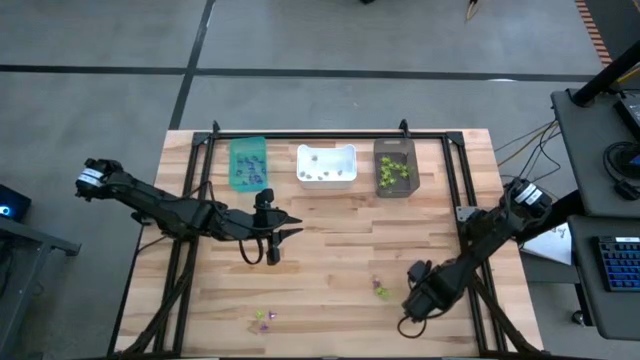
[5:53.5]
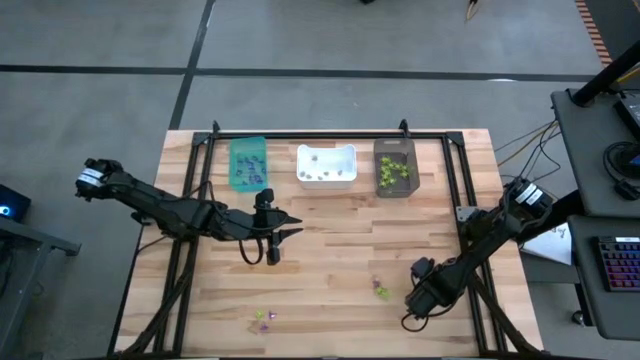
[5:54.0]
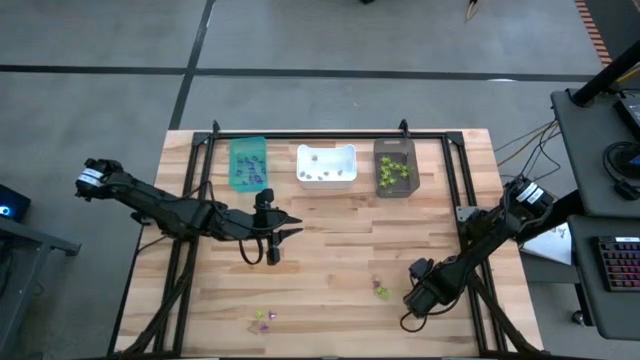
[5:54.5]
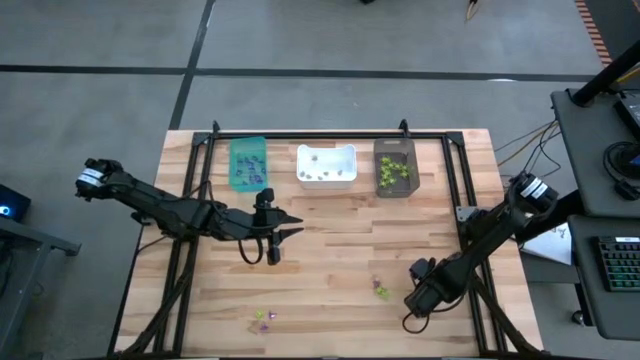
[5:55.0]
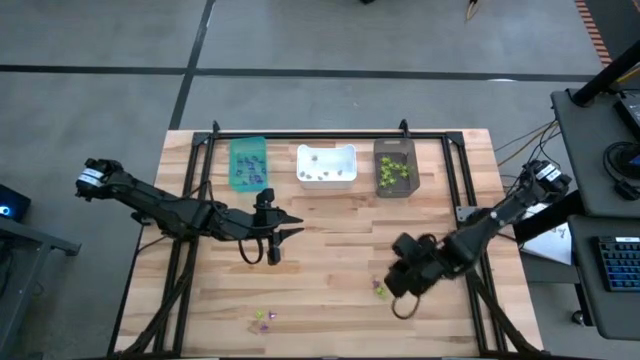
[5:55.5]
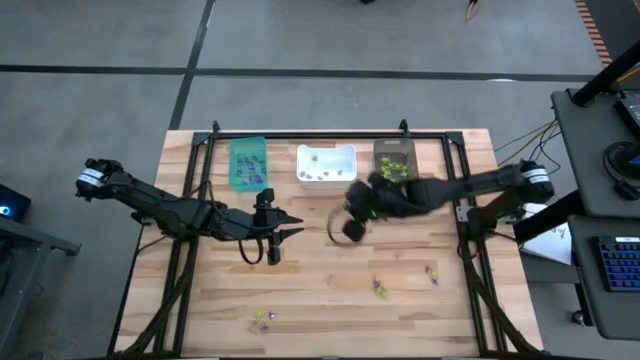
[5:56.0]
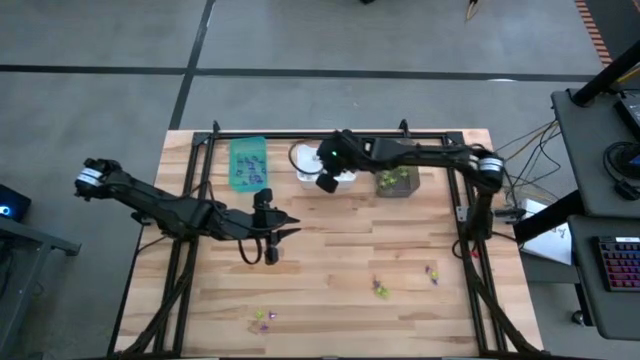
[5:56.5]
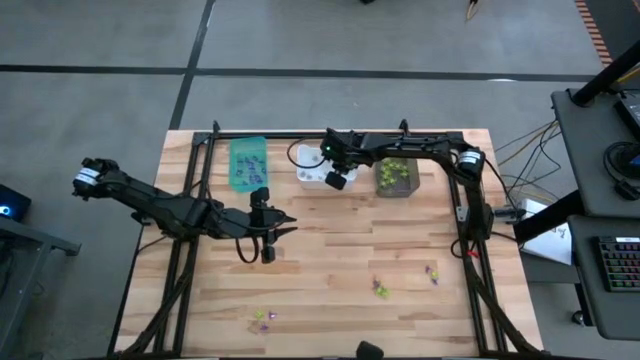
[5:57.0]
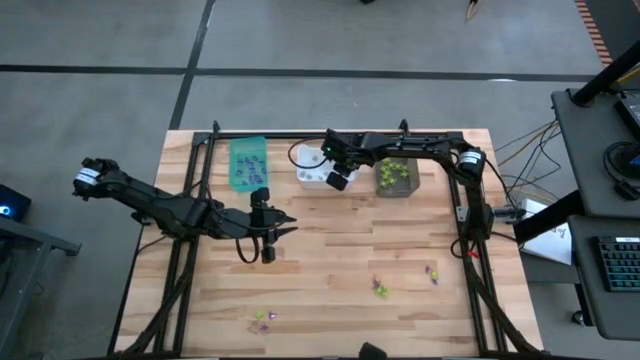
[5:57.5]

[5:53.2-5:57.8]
Task: Sort Halloween decoration
Put the white skull toy into the white bin

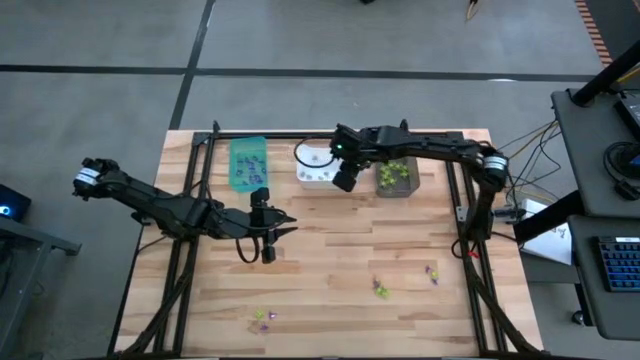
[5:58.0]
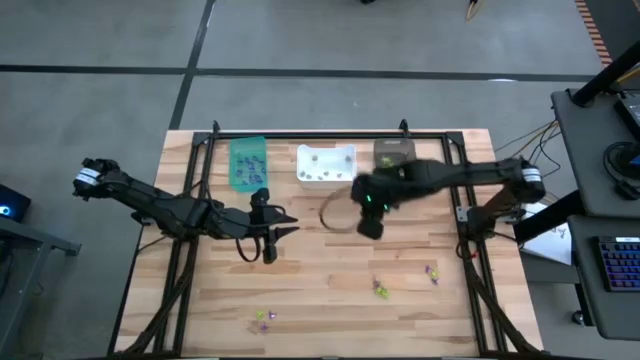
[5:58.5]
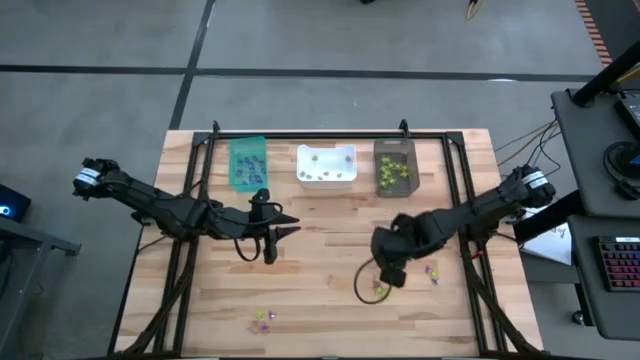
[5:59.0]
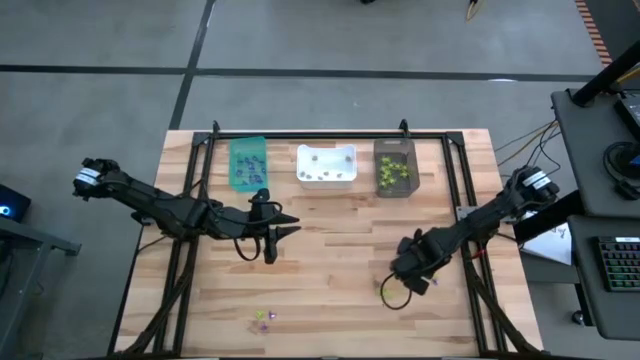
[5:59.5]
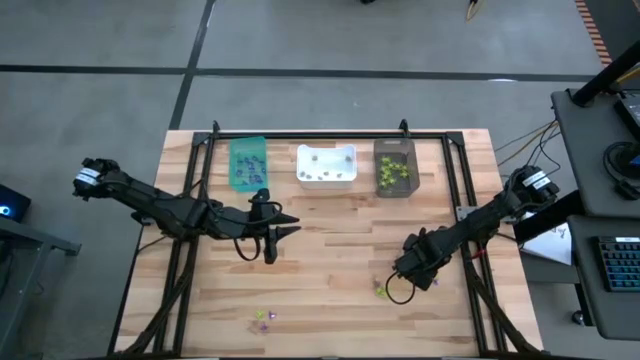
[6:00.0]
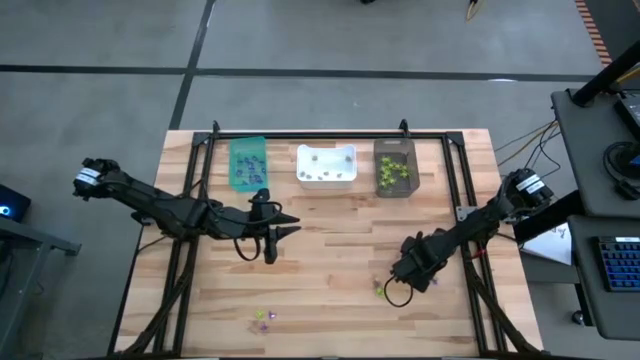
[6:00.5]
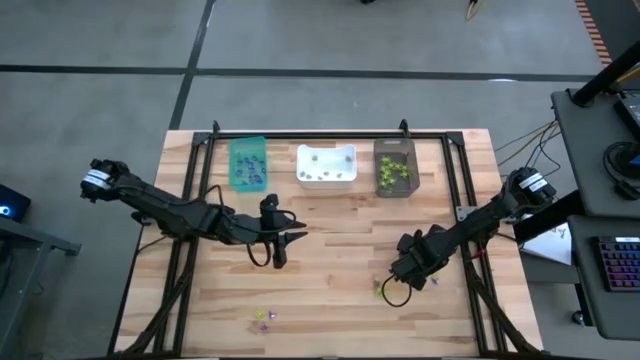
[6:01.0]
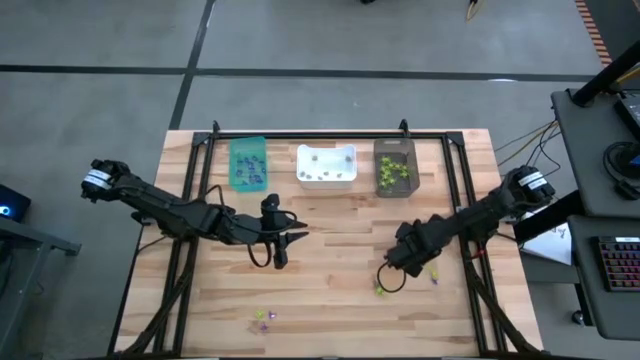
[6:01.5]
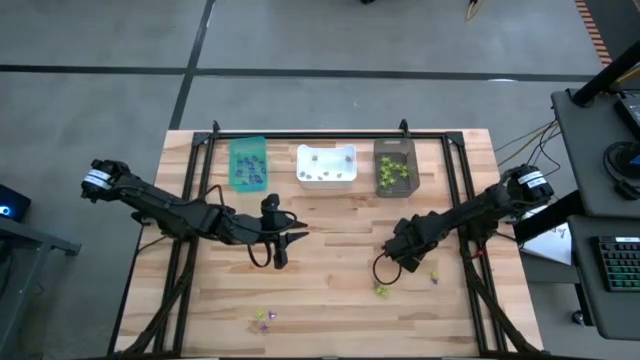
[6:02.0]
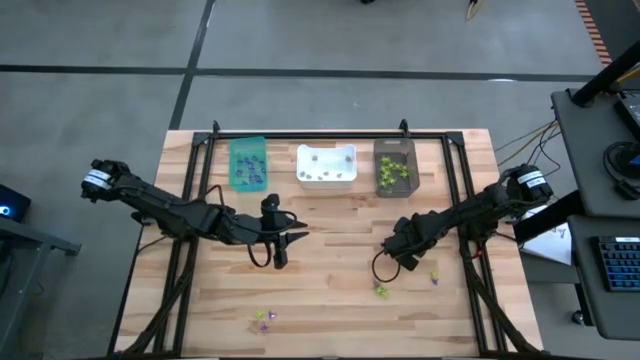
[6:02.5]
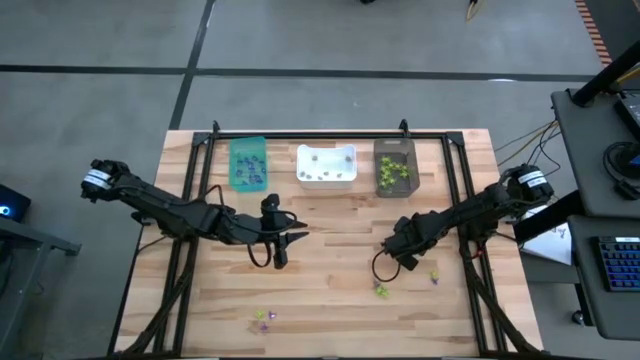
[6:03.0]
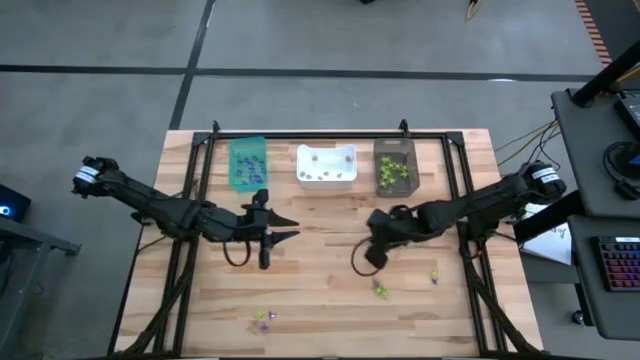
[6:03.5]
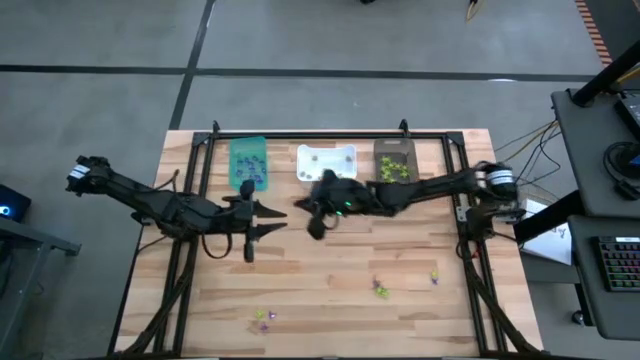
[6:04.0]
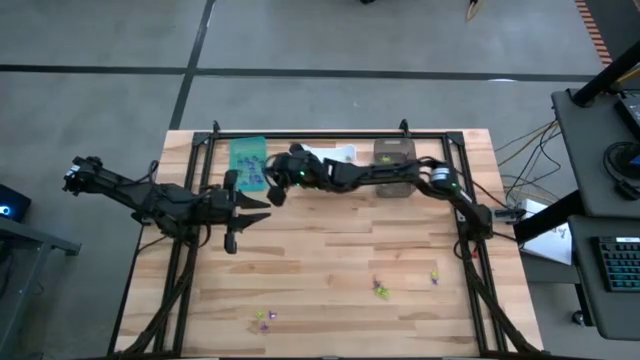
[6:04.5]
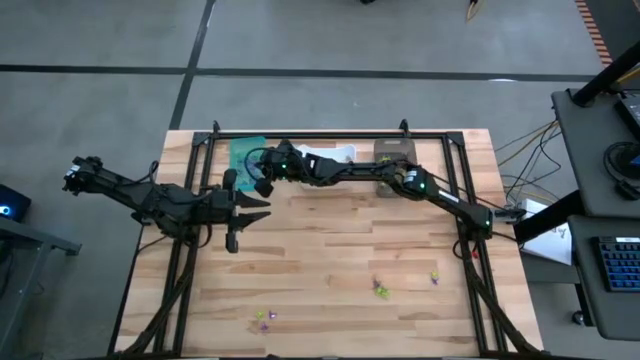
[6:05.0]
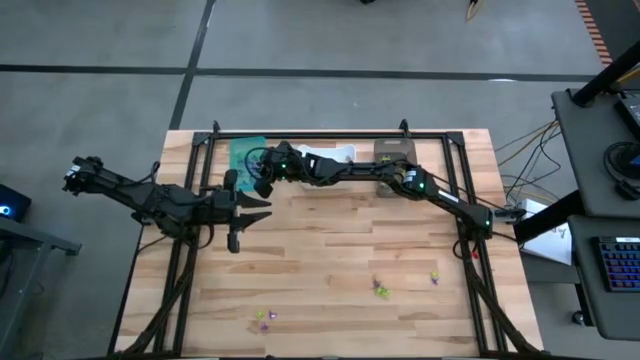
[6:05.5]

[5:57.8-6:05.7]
Put the purple witch hat toy into the light blue bin

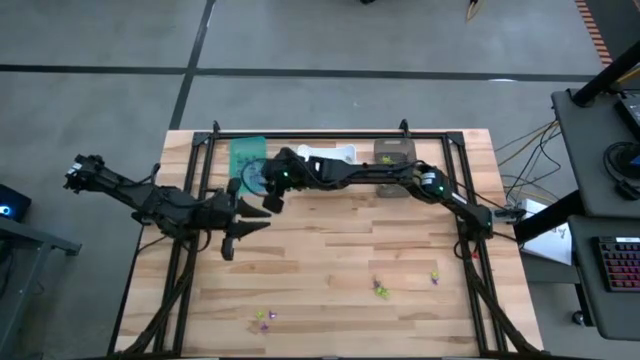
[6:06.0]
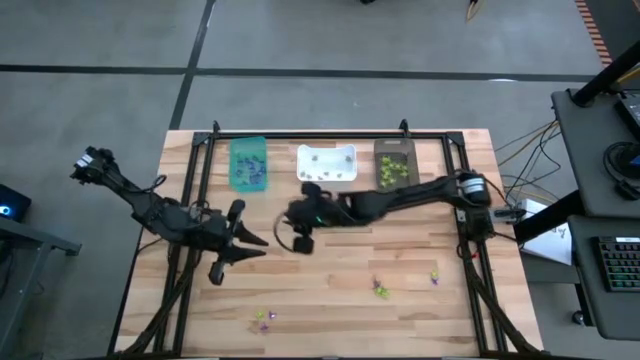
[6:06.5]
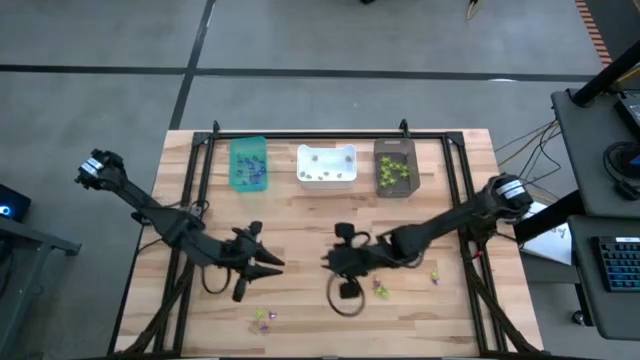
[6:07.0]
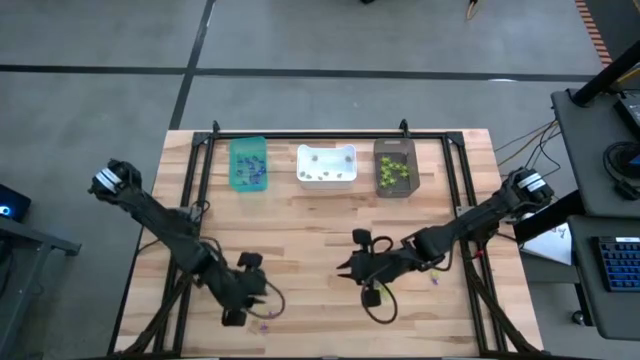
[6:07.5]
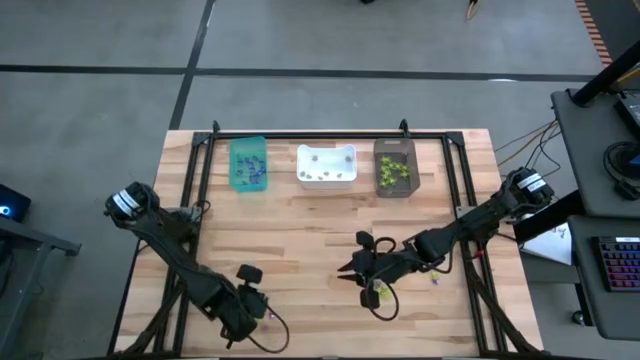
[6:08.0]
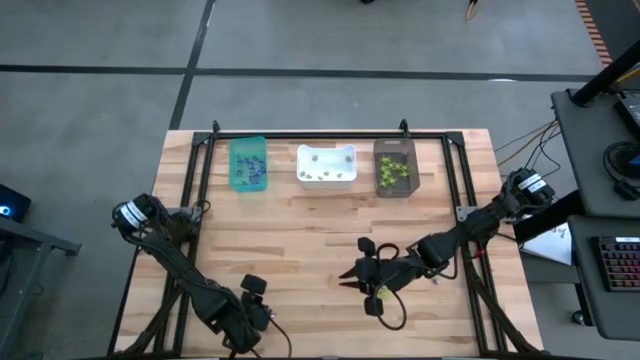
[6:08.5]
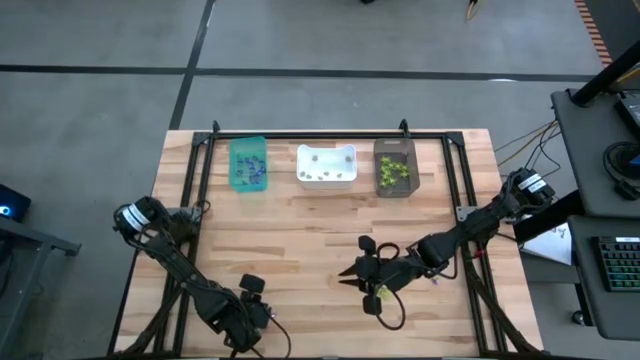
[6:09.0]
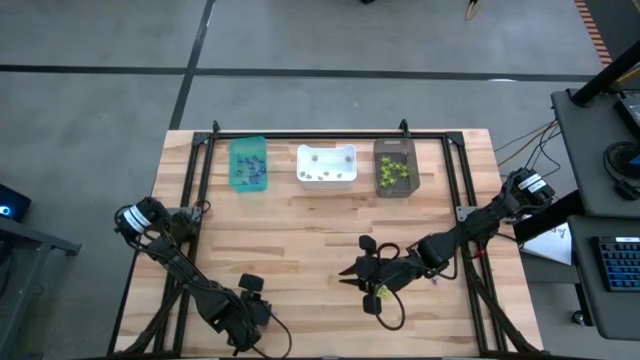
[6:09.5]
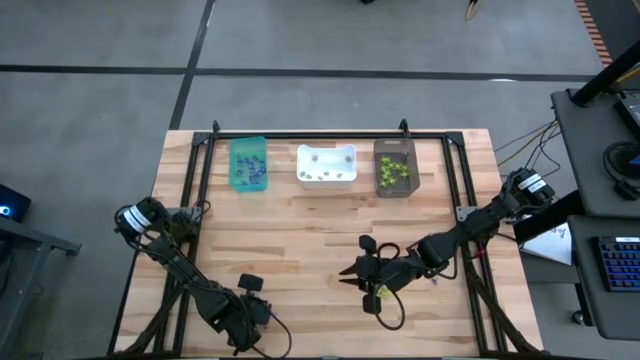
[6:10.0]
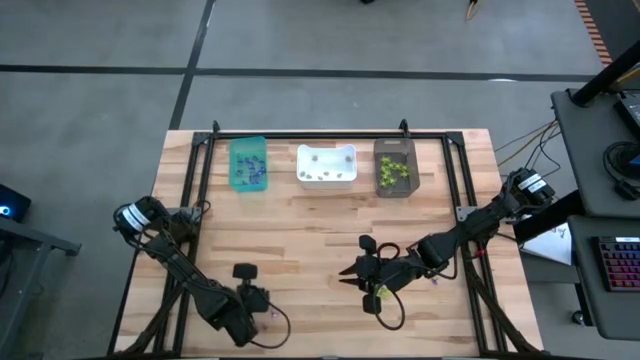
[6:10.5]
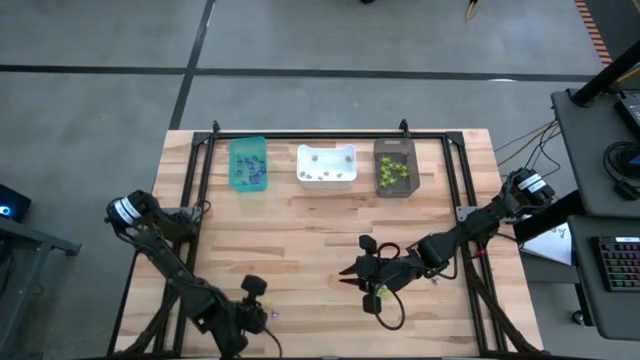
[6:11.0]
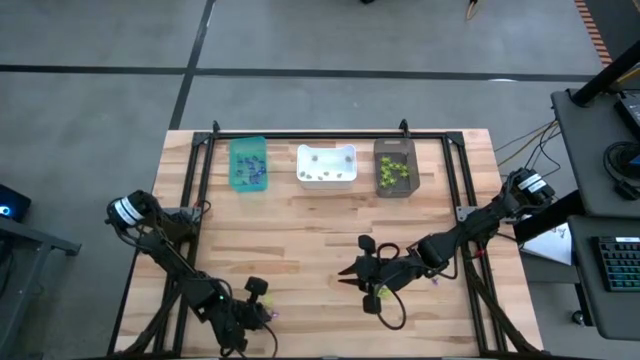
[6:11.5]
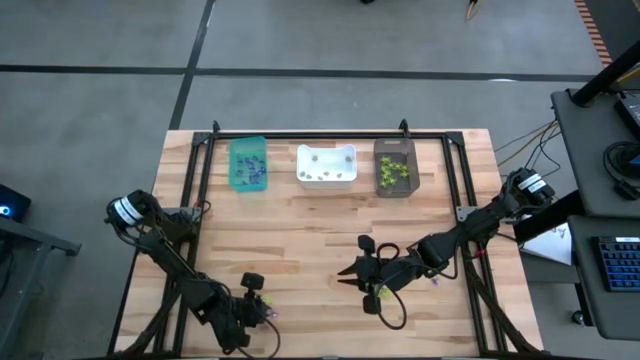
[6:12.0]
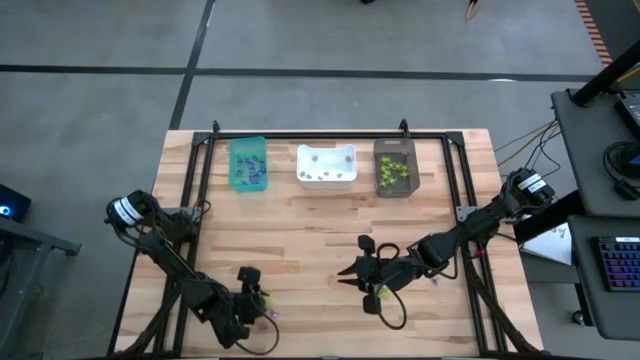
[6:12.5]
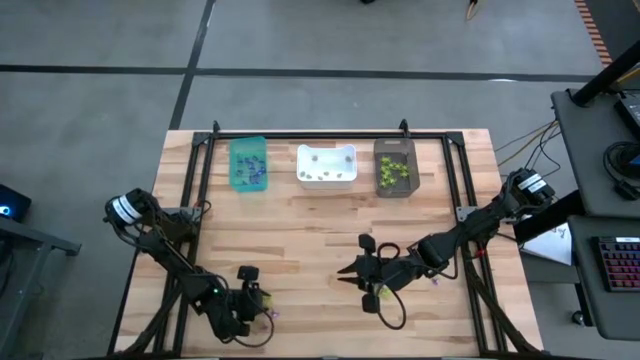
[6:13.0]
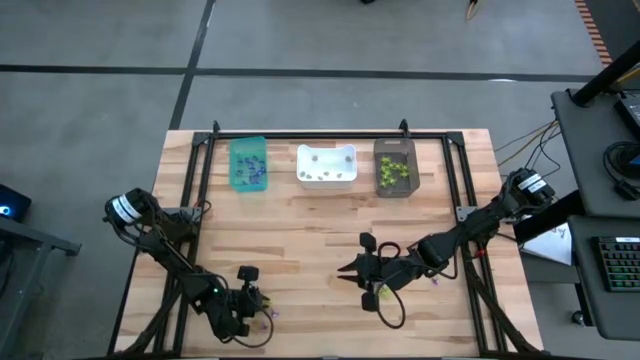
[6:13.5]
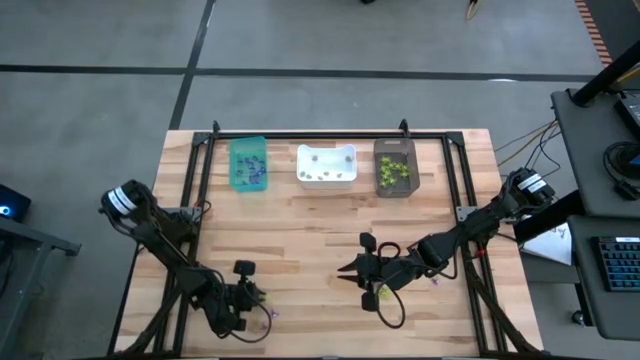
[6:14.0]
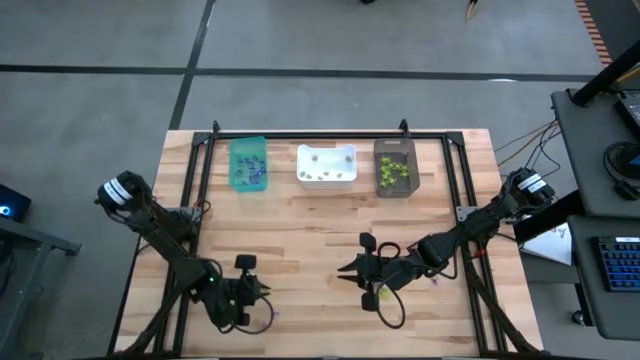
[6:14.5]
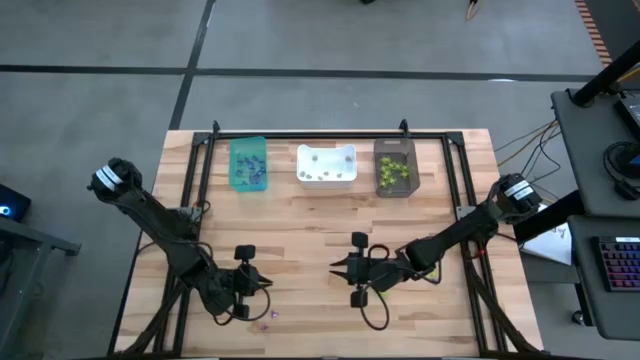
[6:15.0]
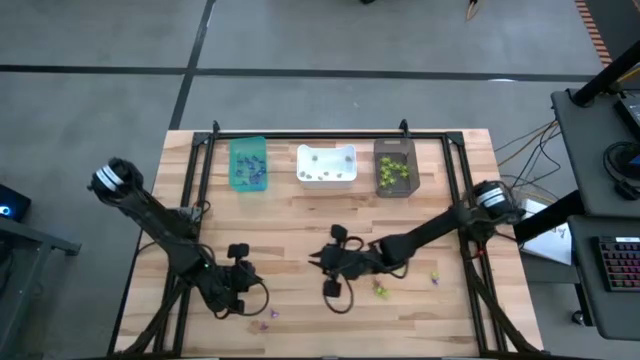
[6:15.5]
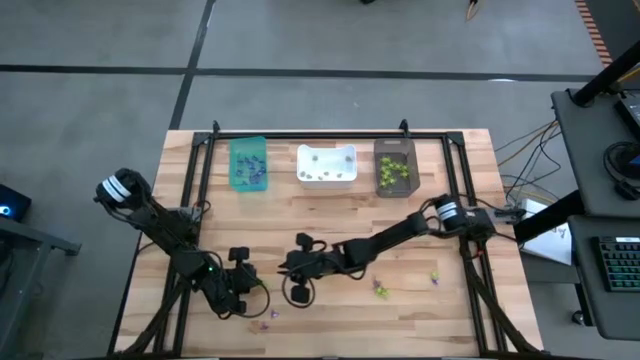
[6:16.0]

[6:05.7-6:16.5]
Put the green spider toy into the black bin
